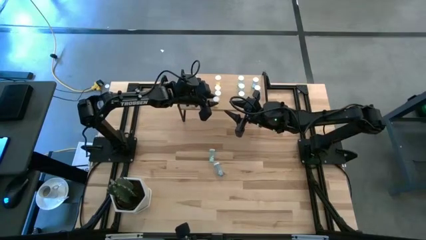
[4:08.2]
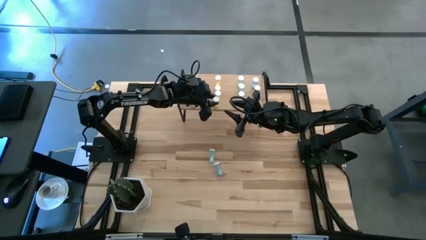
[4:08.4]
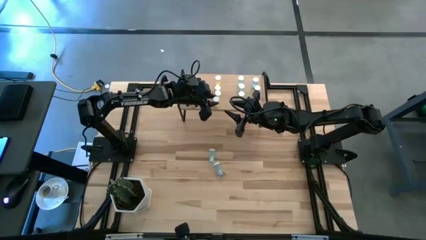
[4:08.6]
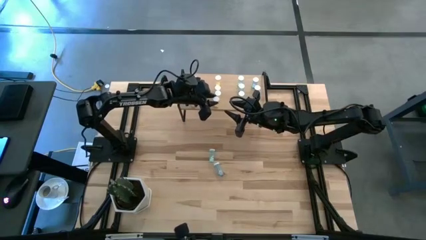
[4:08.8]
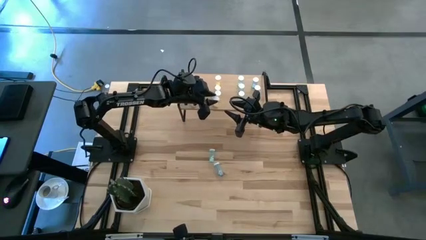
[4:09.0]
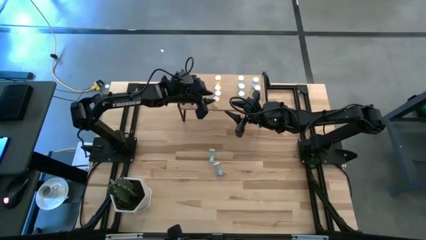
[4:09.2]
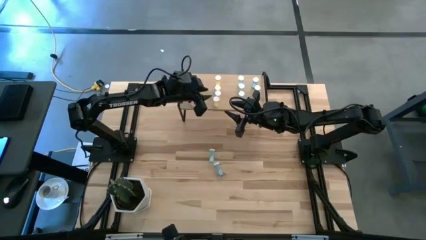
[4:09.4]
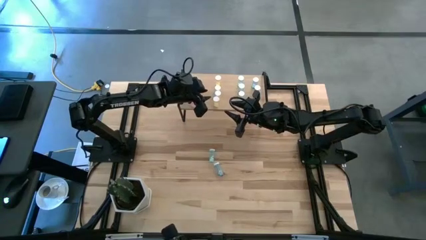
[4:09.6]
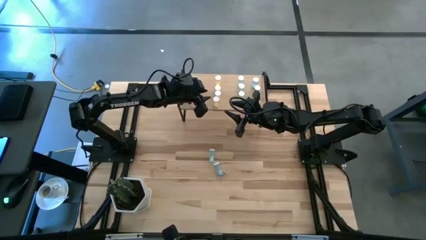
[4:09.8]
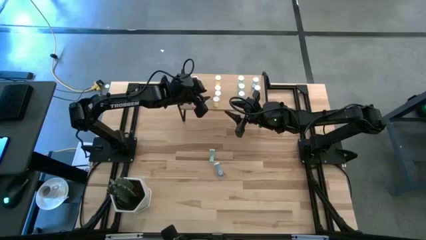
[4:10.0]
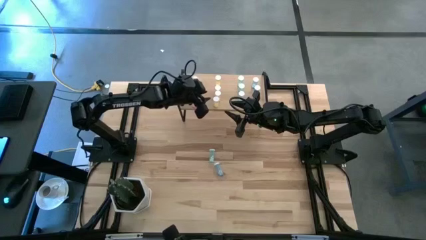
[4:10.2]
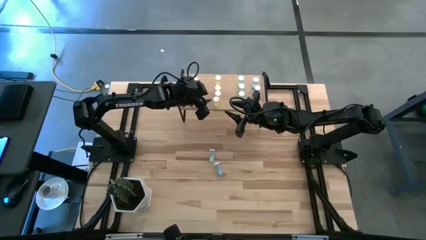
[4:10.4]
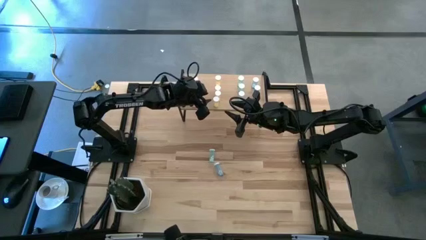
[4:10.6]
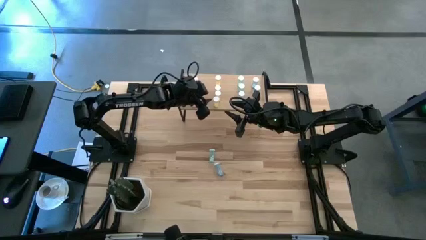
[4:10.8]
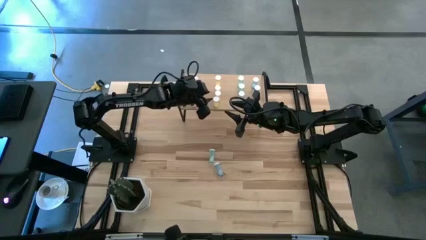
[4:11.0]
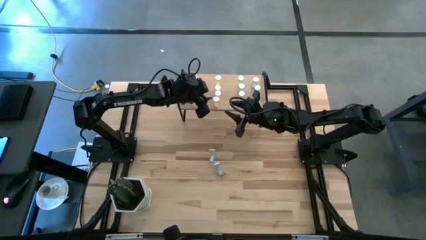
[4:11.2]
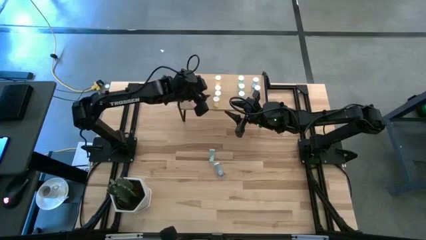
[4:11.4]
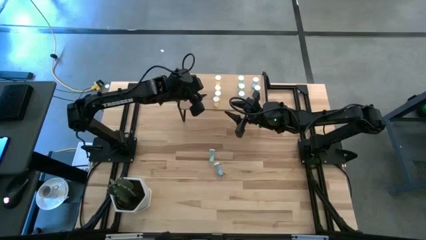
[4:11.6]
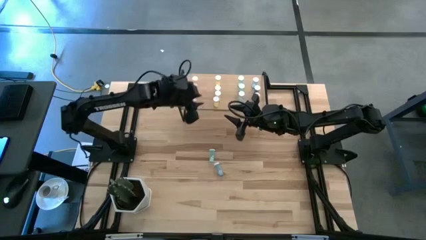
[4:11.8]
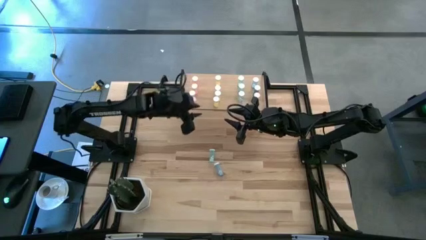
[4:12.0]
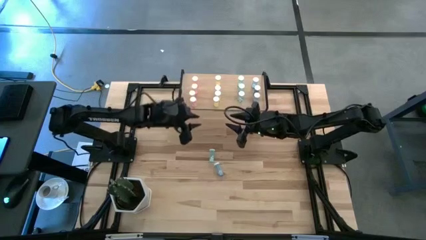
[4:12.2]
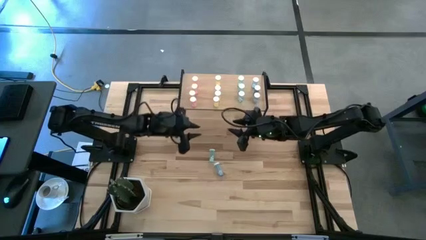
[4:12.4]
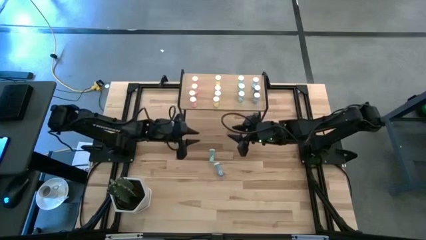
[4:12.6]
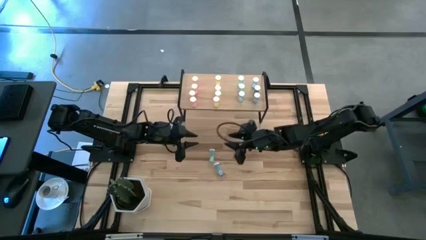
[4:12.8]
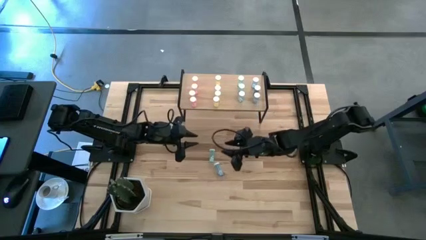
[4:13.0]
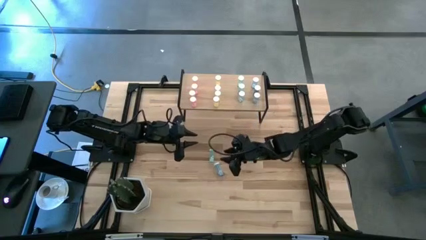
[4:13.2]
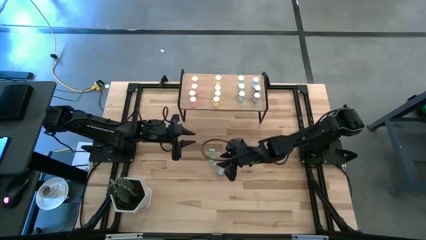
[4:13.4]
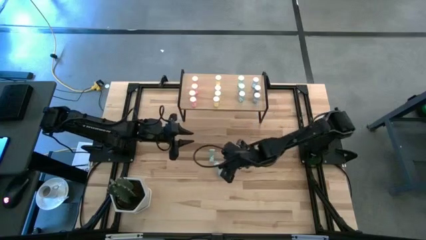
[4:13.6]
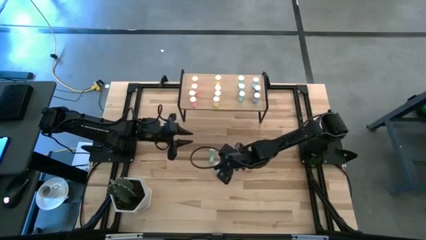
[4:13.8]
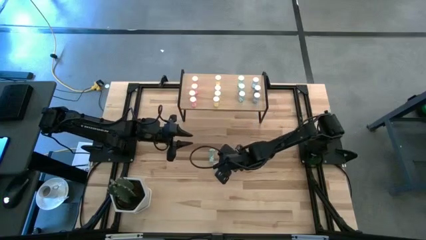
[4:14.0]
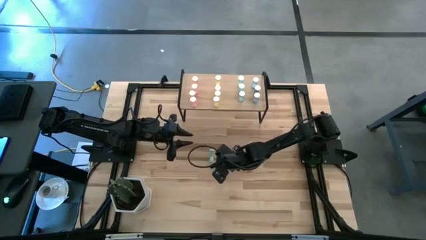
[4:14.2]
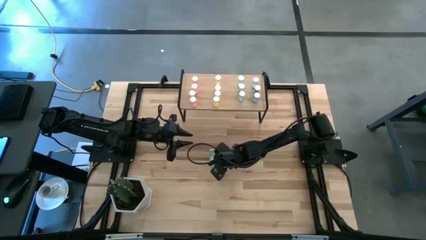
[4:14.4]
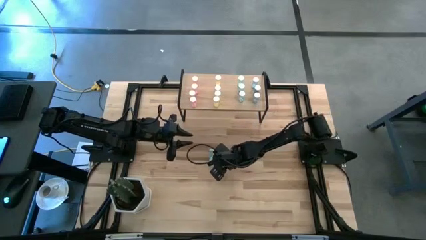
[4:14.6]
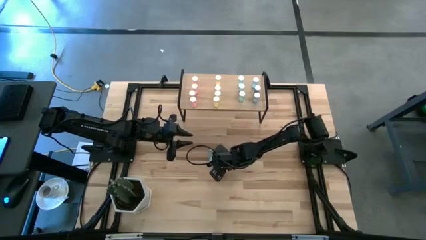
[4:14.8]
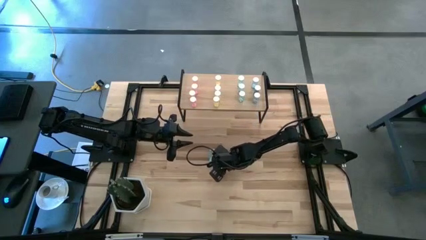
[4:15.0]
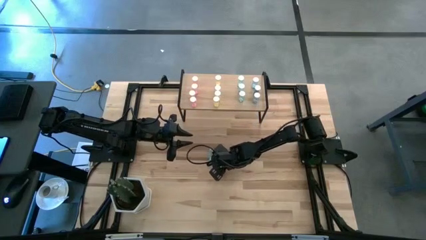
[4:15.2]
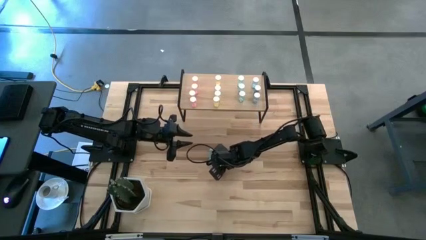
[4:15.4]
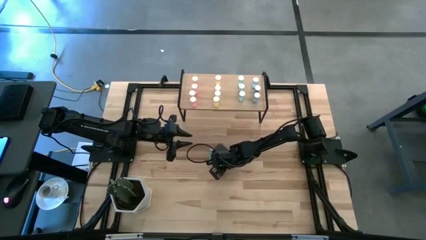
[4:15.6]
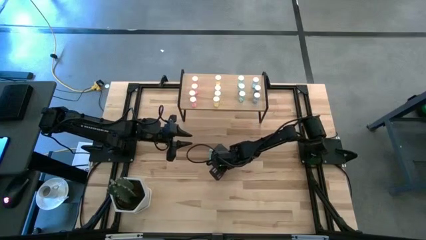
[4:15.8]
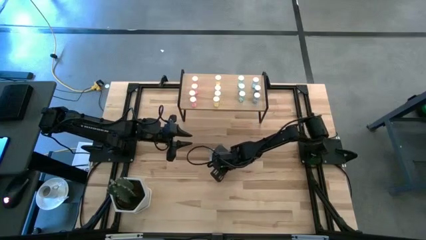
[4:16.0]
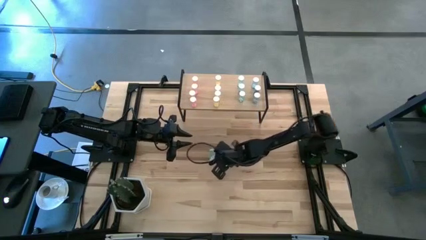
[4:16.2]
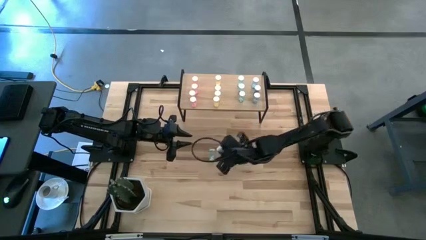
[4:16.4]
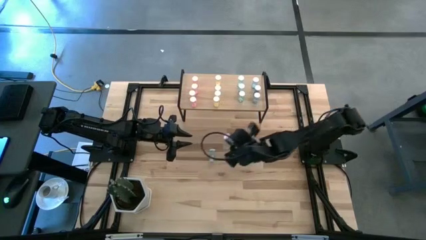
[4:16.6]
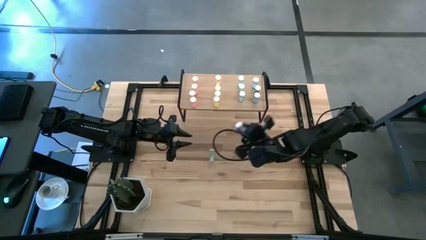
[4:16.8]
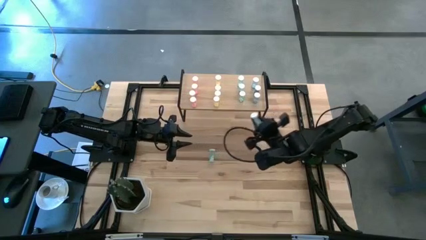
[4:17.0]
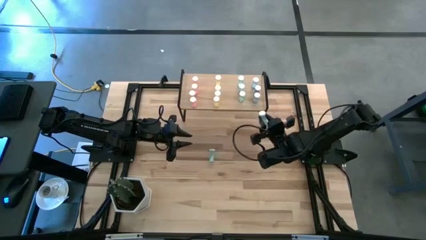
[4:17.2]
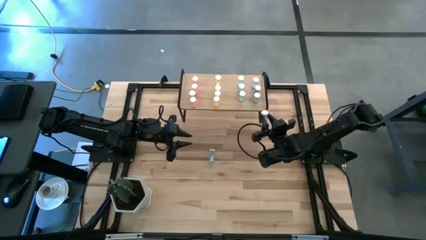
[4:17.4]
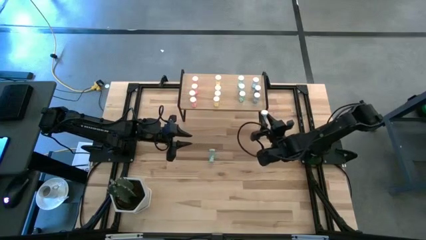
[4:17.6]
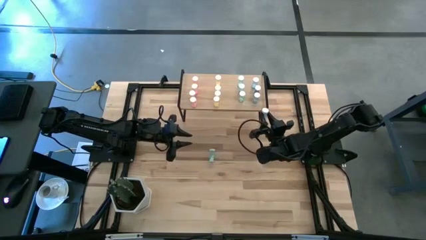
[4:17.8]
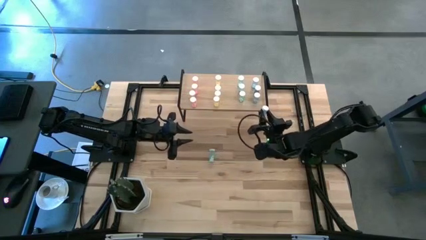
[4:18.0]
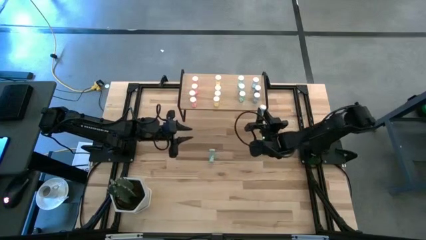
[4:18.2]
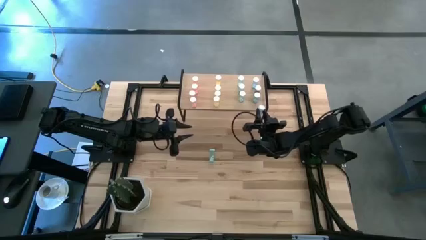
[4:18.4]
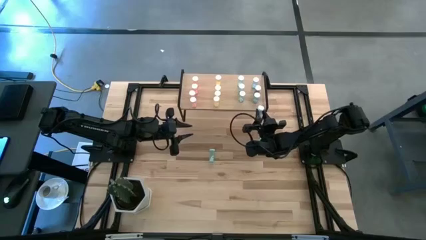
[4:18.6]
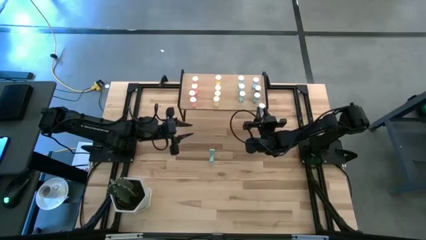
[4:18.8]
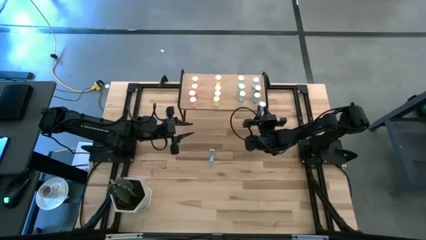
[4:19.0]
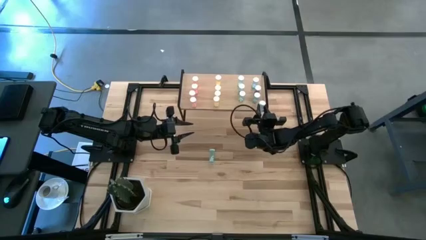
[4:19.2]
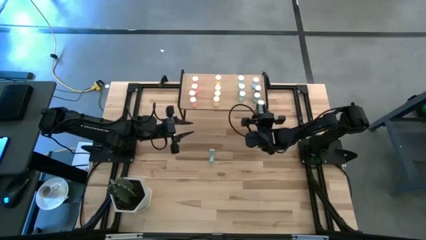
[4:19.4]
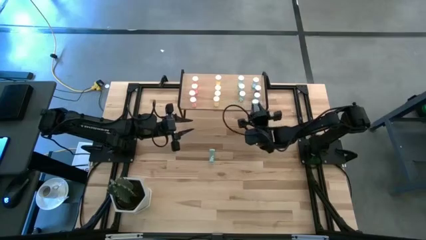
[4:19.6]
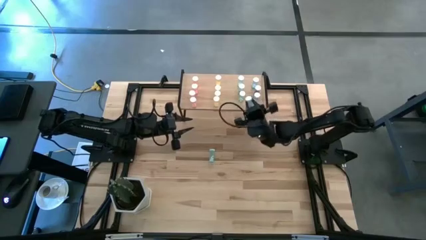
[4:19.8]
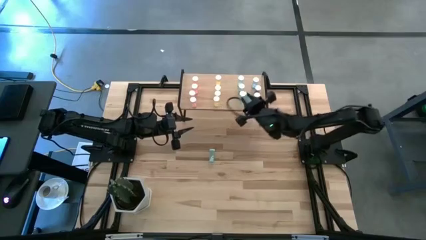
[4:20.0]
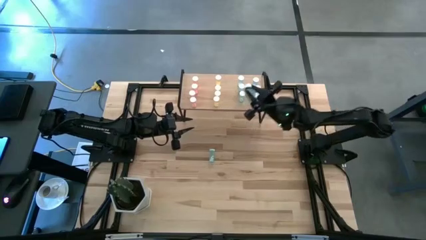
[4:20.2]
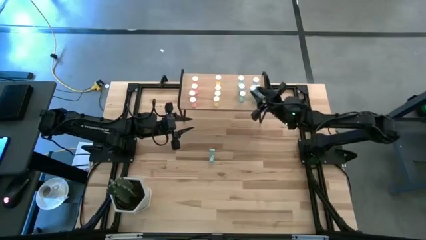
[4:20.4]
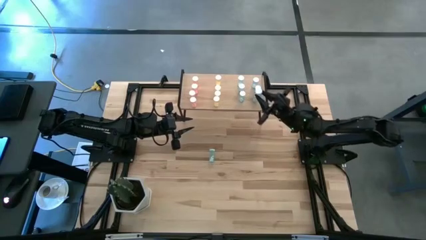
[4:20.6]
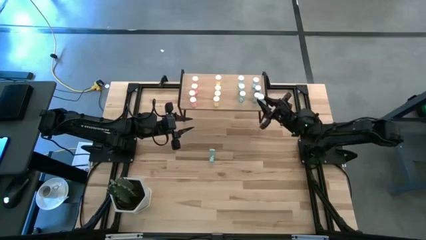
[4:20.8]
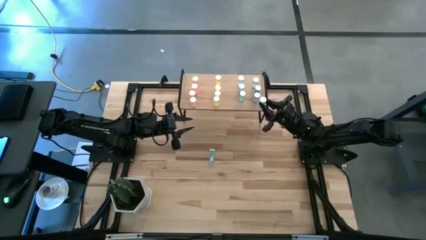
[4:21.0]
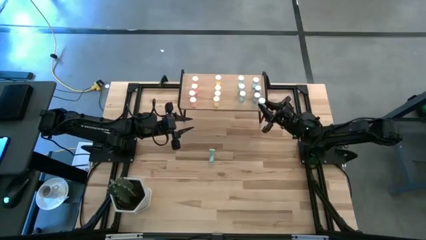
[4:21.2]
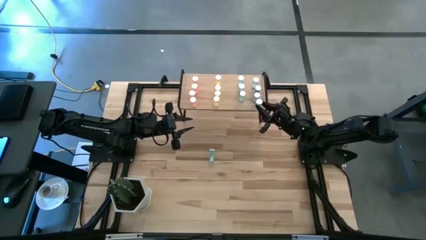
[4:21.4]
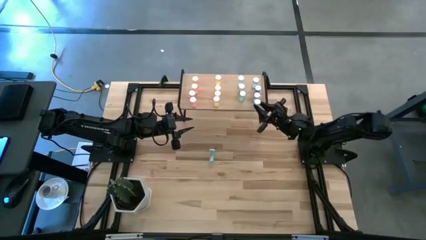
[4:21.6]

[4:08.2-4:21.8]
Task: Pick and place medicine bottles onto shelf by color
Put the blue pill bottle on the shelf aligned with the other blue pill bottles

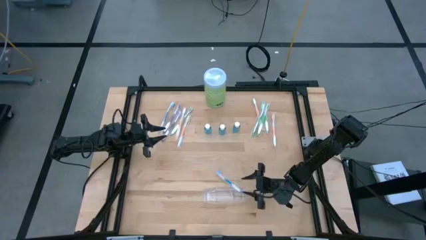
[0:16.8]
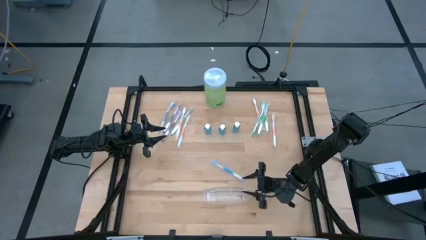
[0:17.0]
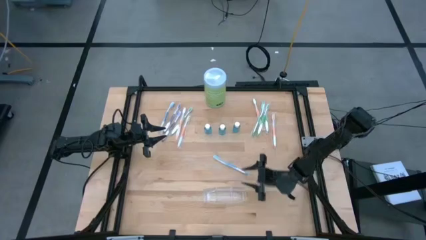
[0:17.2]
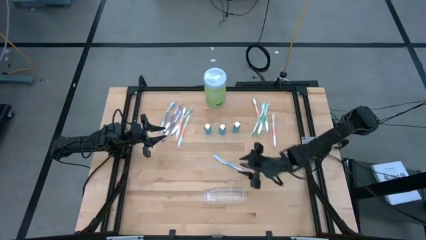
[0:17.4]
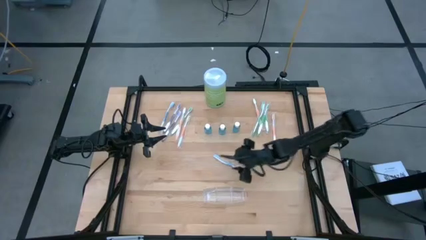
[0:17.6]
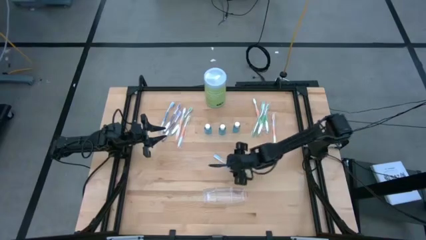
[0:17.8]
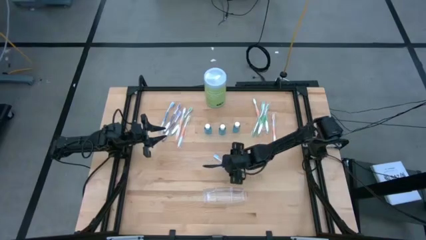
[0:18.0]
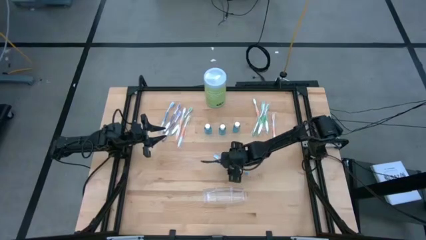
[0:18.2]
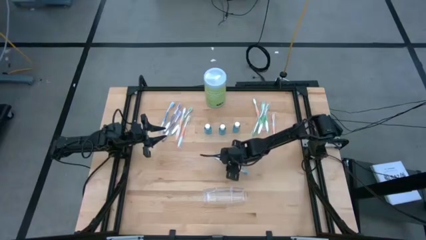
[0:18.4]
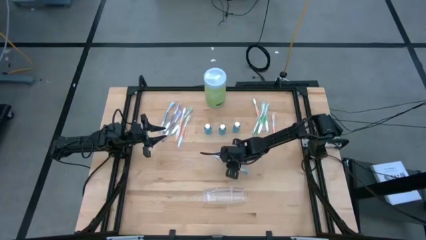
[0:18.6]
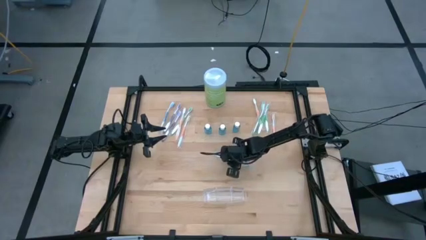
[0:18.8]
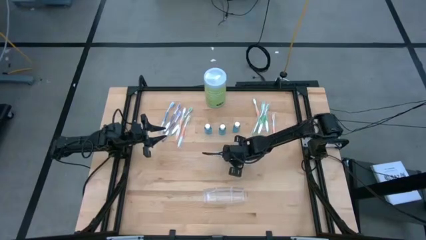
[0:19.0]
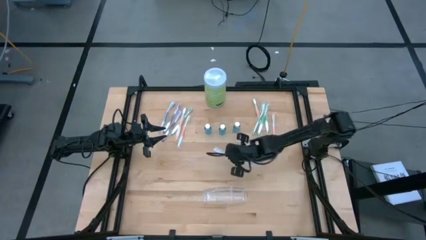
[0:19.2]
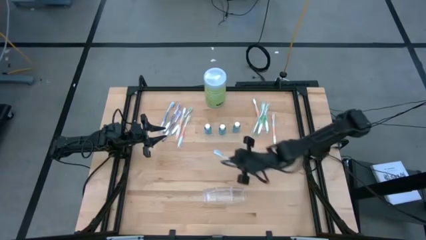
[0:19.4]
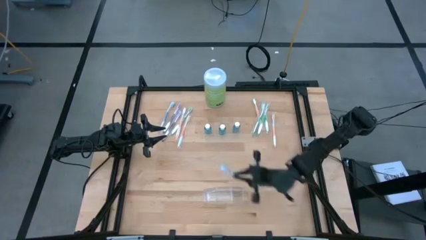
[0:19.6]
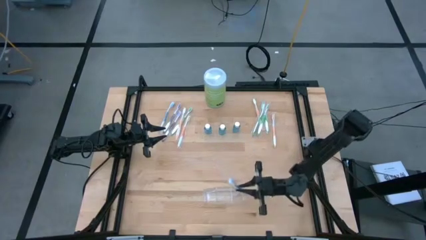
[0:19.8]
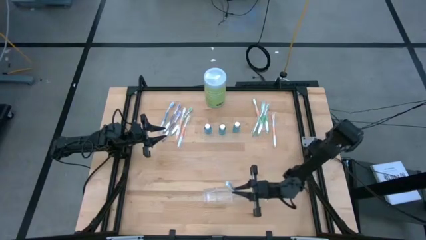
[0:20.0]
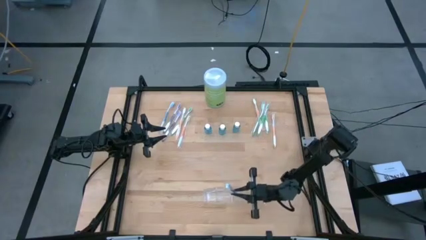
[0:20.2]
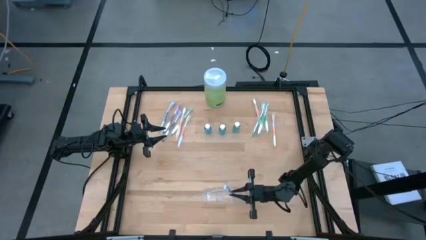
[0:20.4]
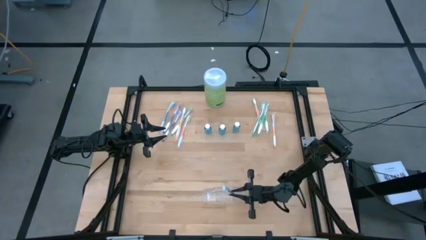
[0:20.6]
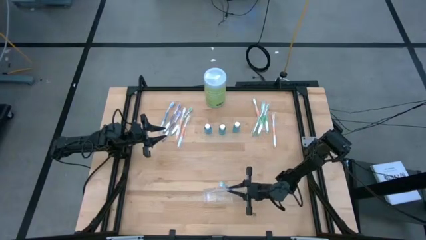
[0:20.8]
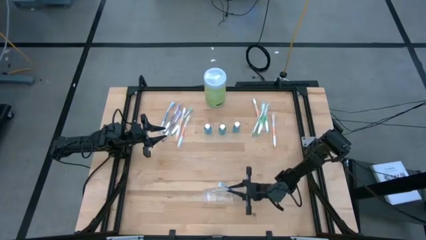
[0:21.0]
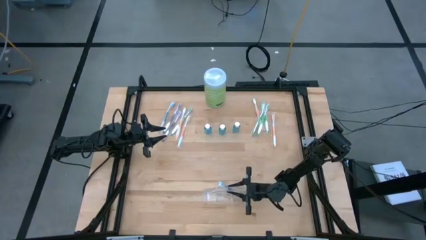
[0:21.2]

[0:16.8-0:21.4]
Task: Pick & Place toothbrushing station
Put the blue toothbrush into the transparent organizer
